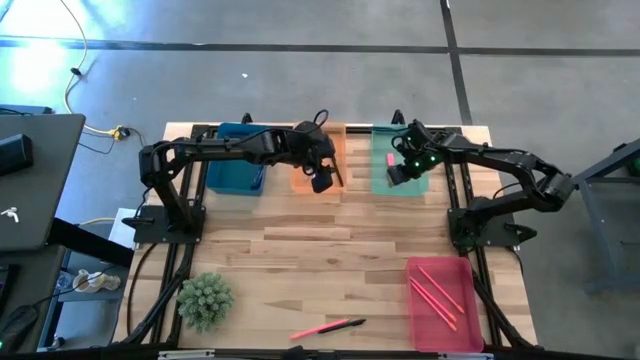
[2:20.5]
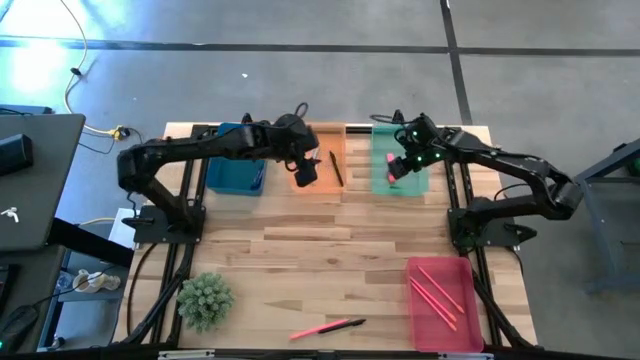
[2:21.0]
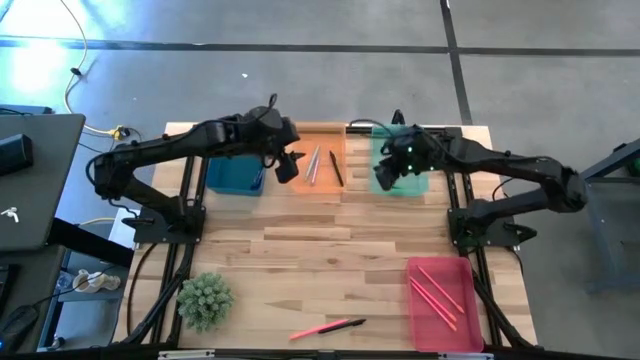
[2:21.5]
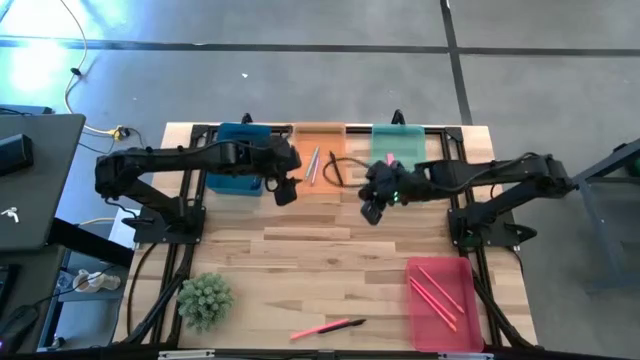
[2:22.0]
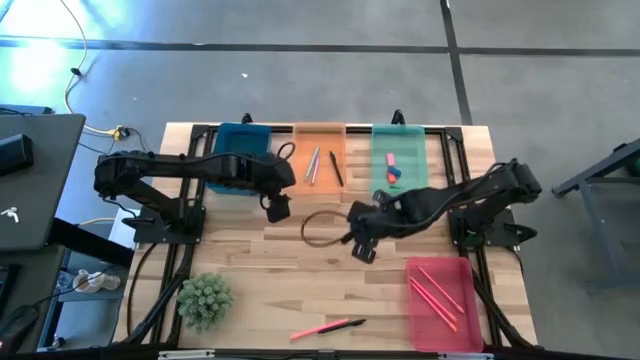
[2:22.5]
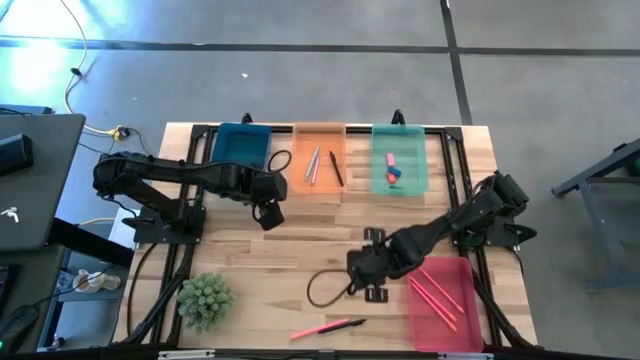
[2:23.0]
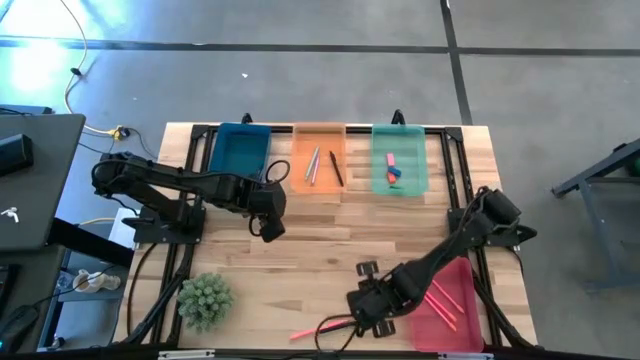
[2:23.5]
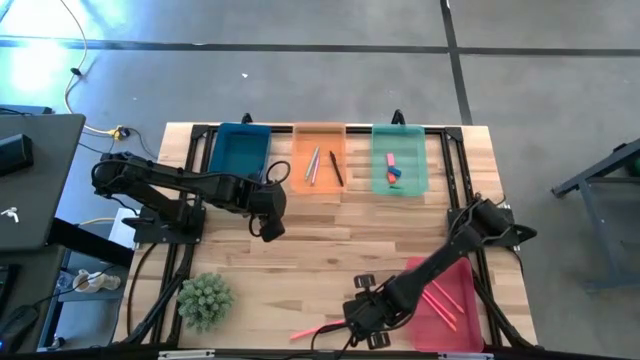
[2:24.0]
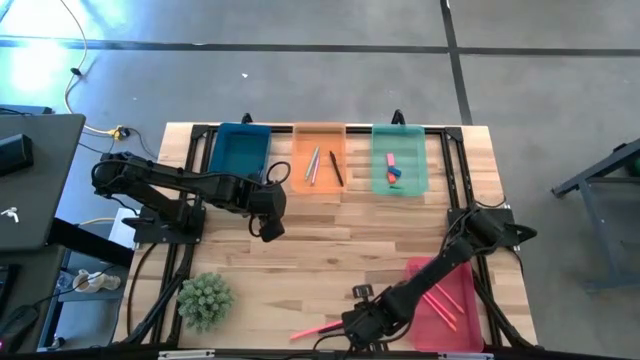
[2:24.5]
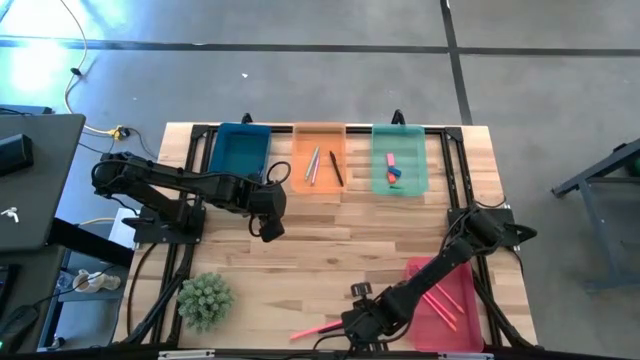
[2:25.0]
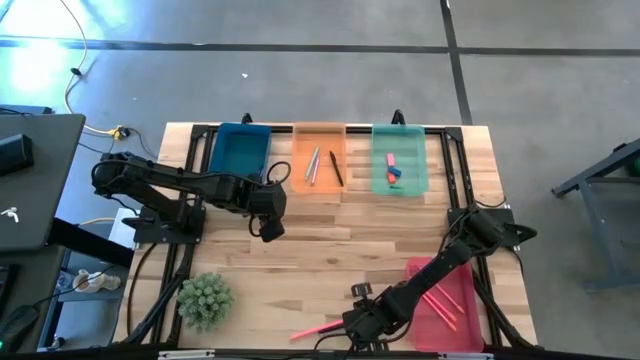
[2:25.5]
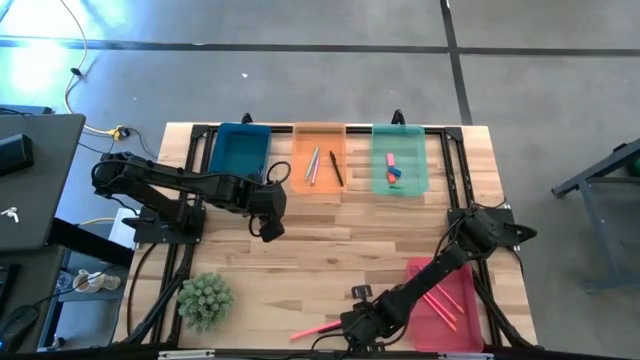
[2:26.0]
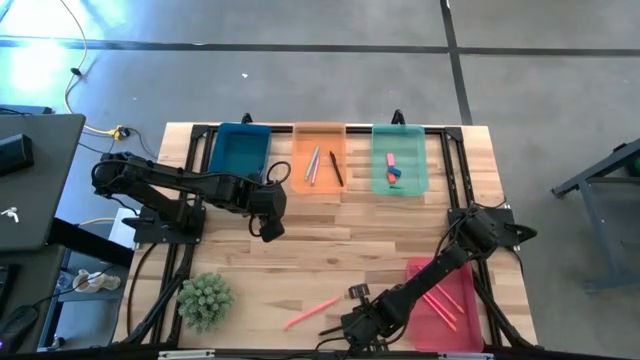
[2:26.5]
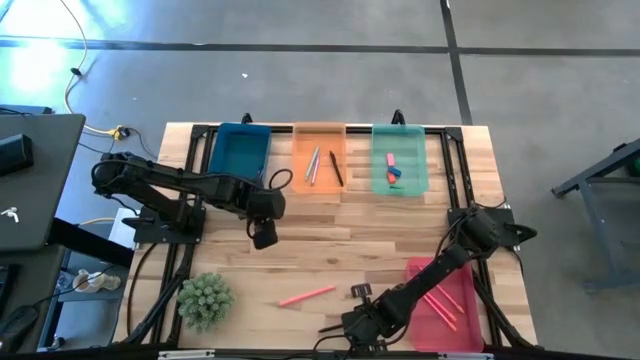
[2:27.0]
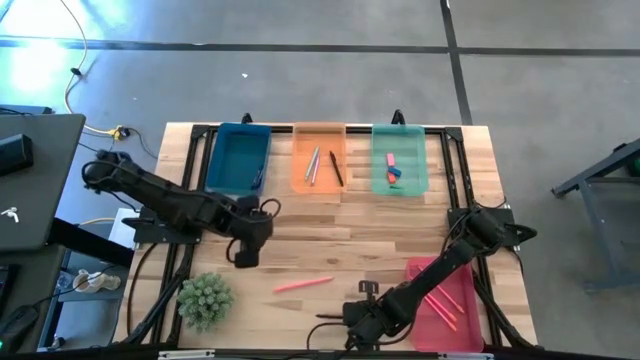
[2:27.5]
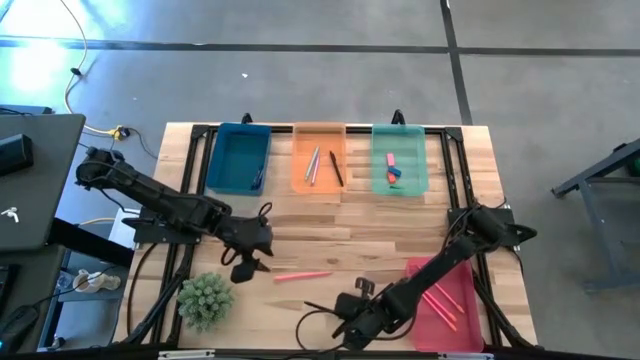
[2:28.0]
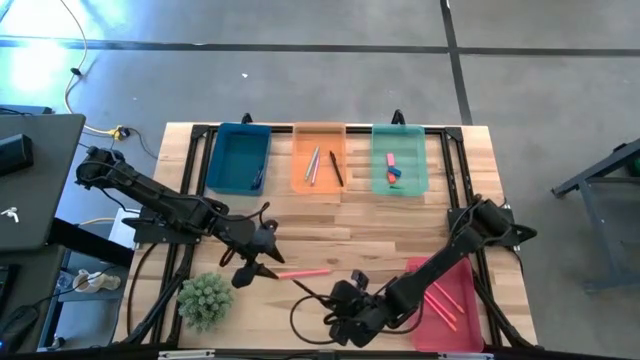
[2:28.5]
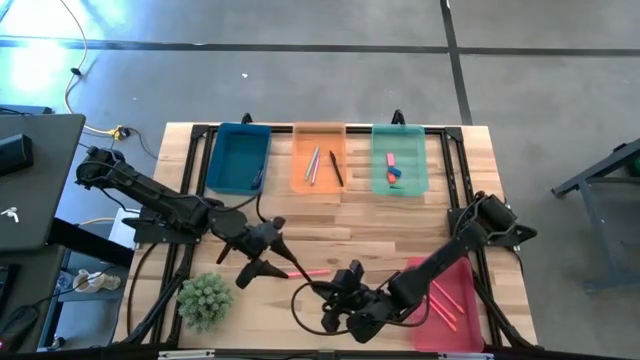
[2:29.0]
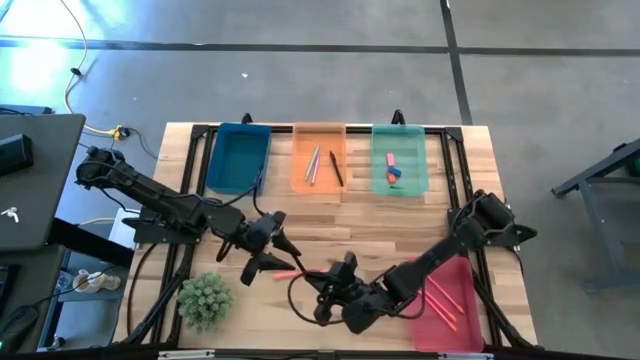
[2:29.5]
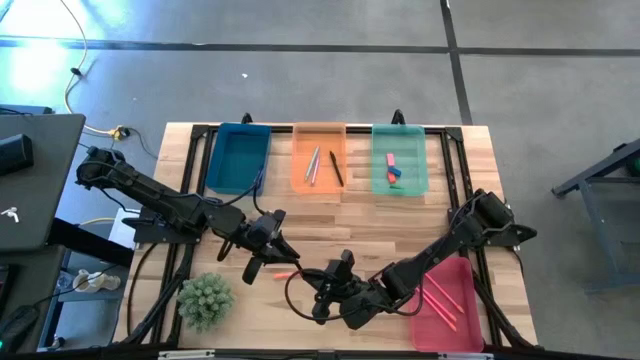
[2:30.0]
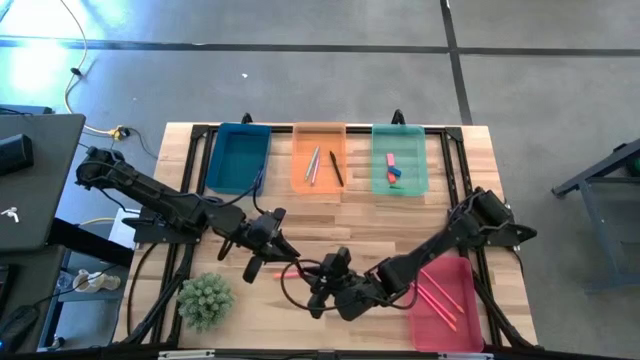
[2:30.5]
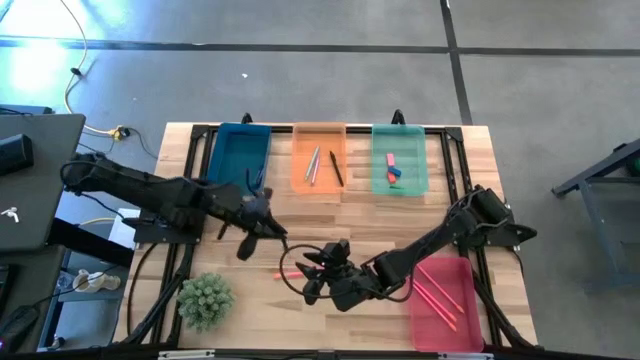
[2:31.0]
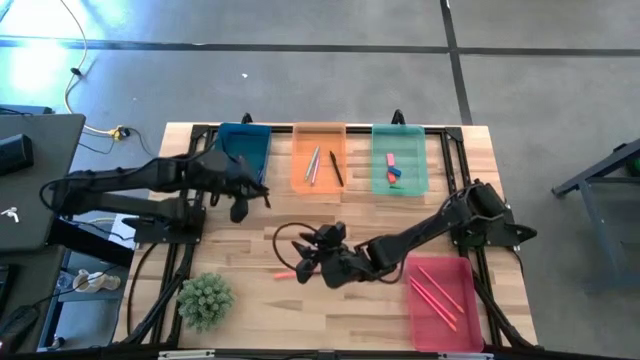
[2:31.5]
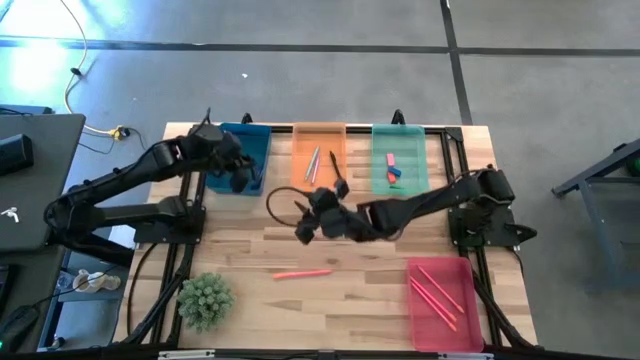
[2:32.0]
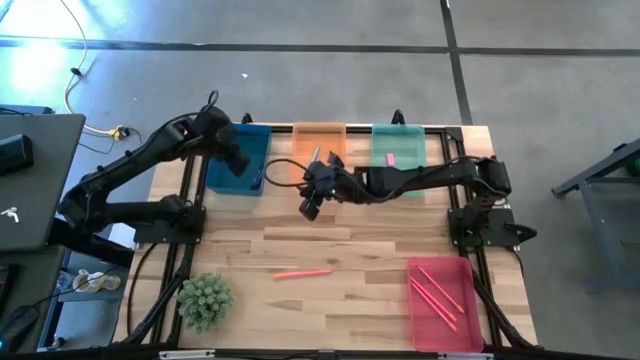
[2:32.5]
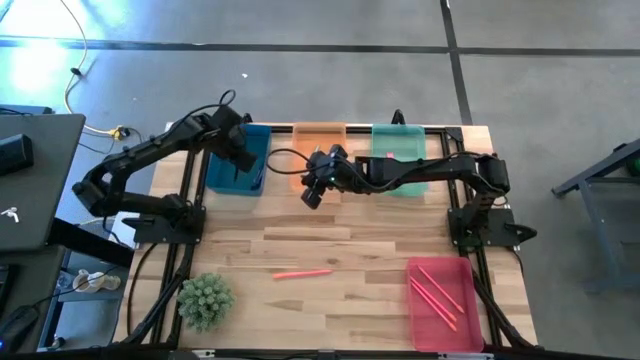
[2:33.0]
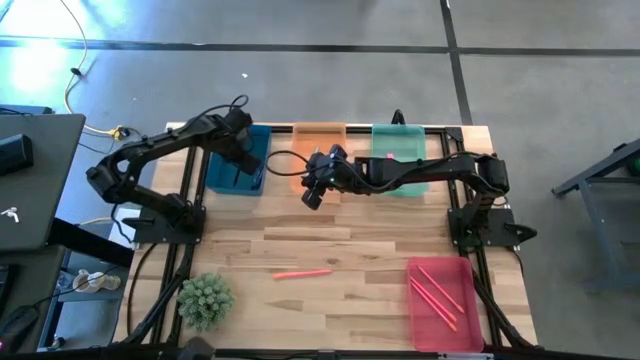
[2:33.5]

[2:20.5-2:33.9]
Task: Sort crayons/erasers/pens/pencils in bins
Put the black ballpen into the orange bin

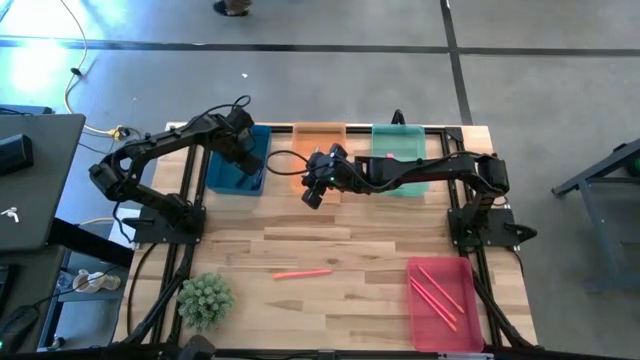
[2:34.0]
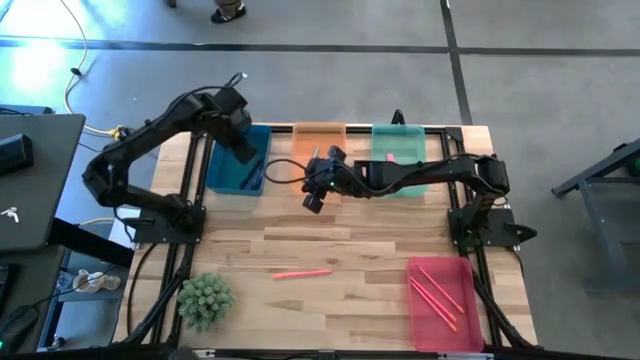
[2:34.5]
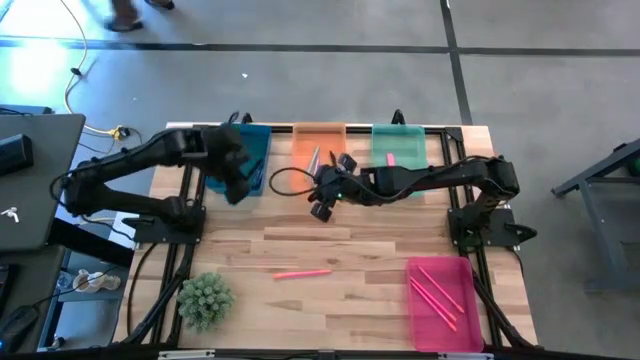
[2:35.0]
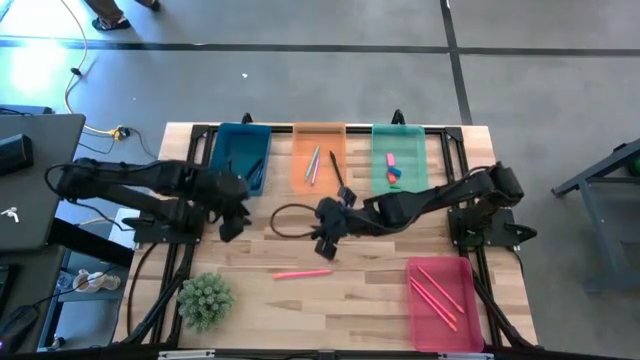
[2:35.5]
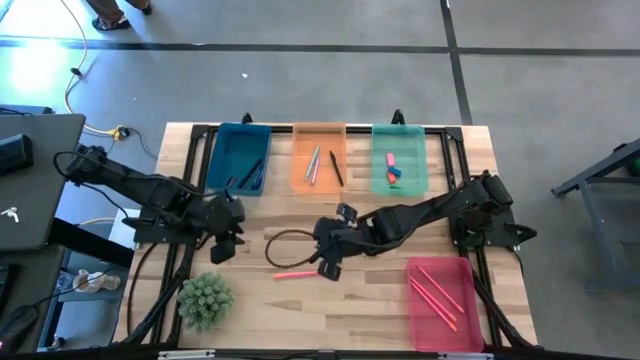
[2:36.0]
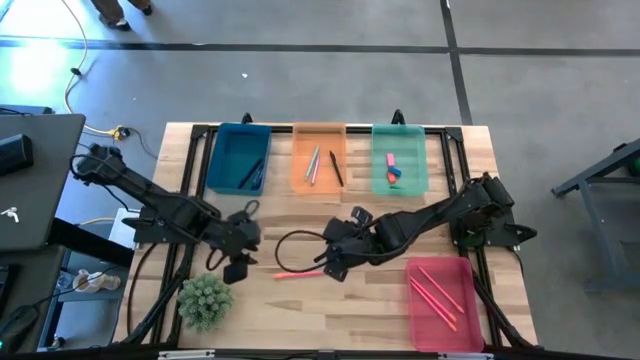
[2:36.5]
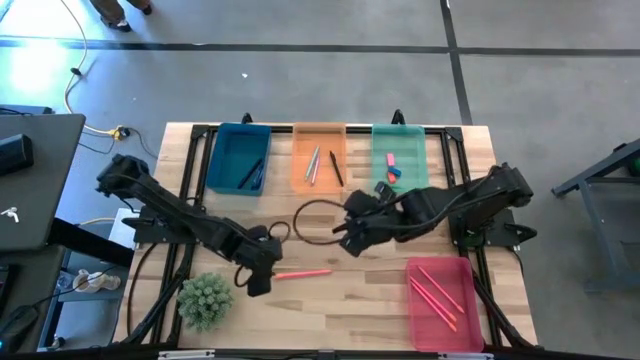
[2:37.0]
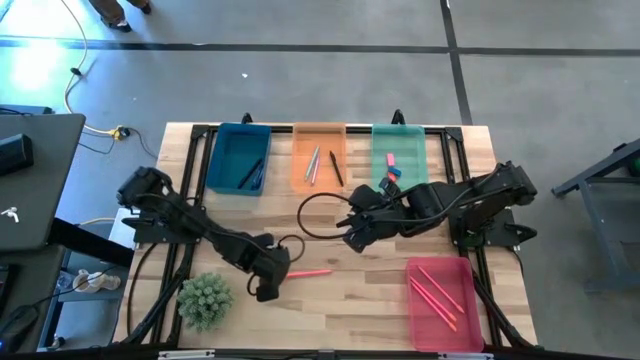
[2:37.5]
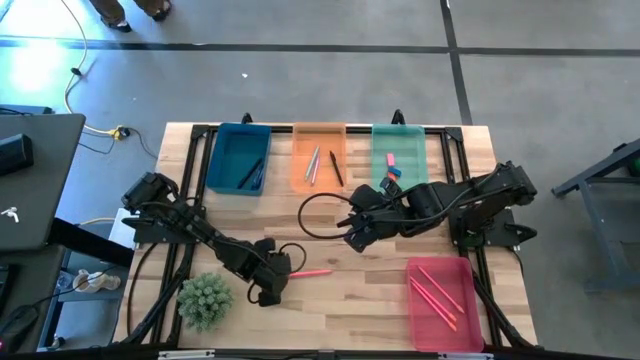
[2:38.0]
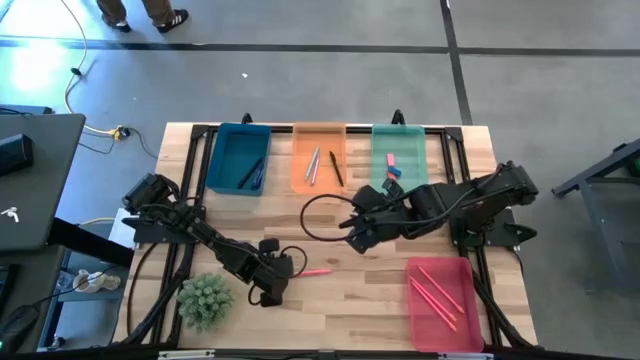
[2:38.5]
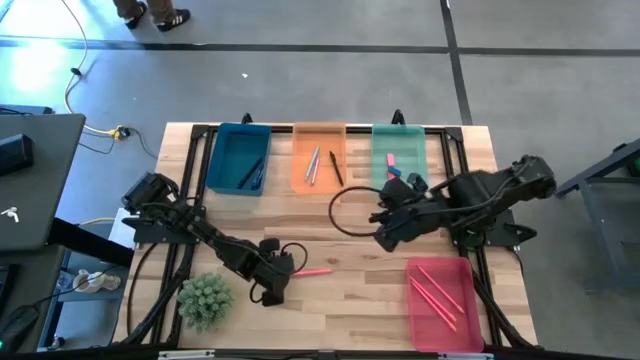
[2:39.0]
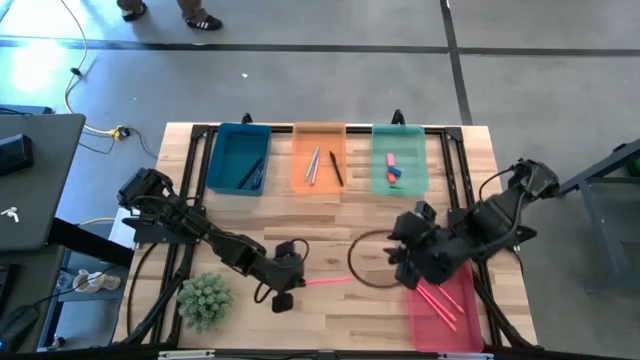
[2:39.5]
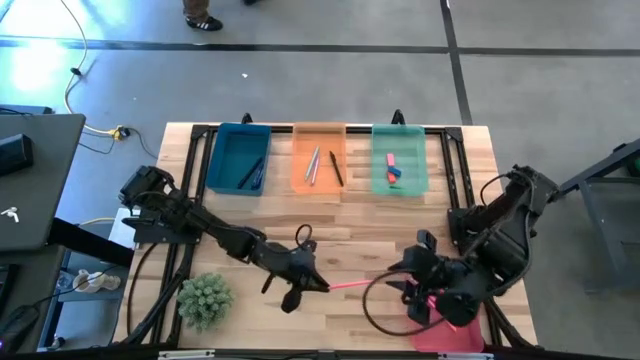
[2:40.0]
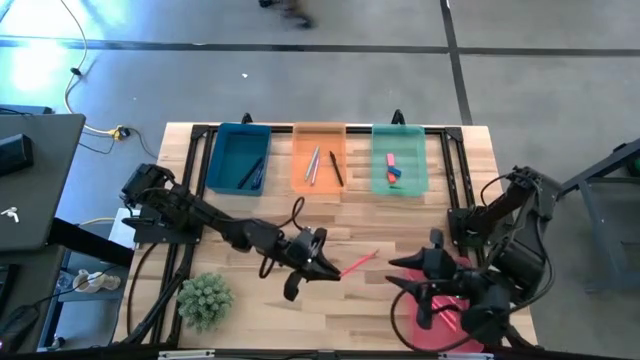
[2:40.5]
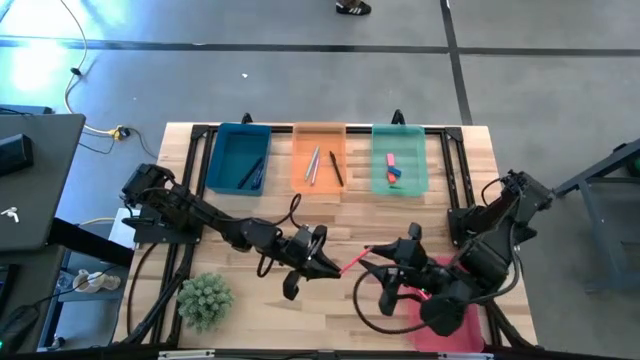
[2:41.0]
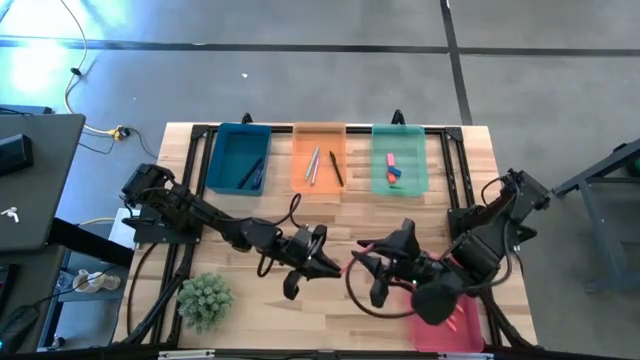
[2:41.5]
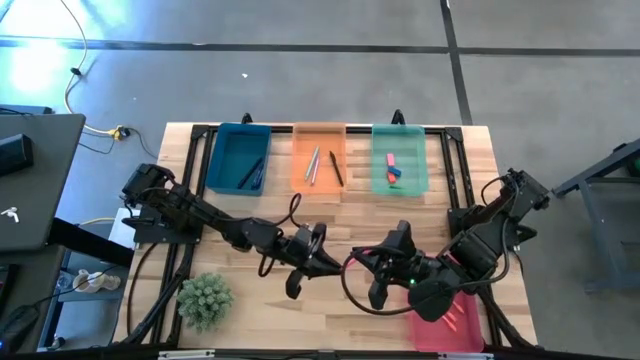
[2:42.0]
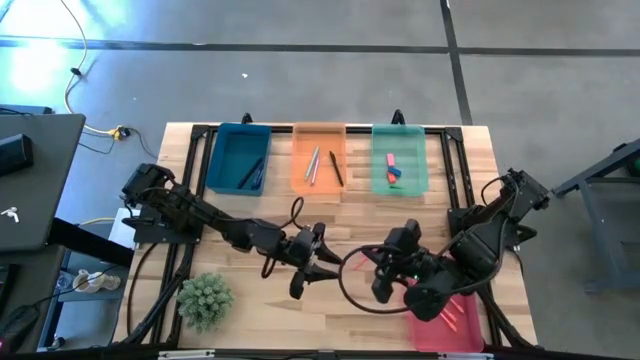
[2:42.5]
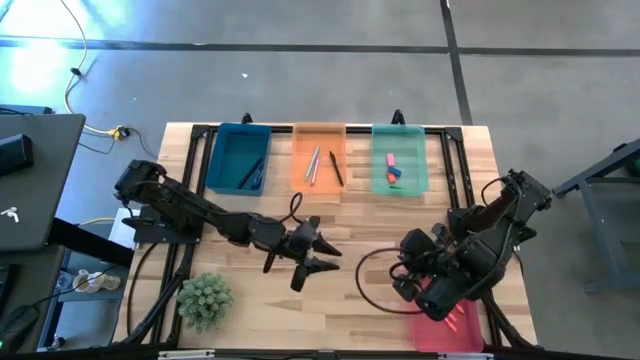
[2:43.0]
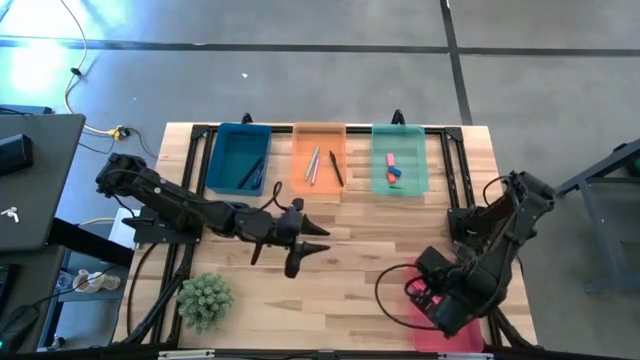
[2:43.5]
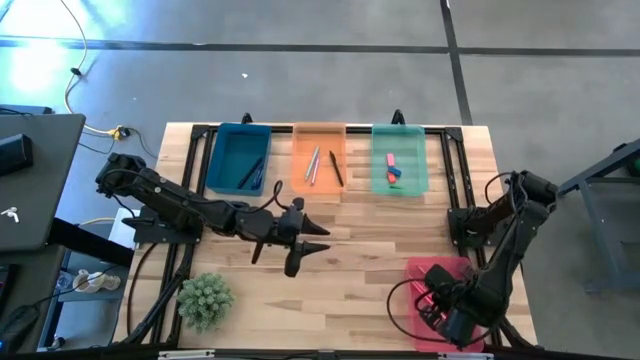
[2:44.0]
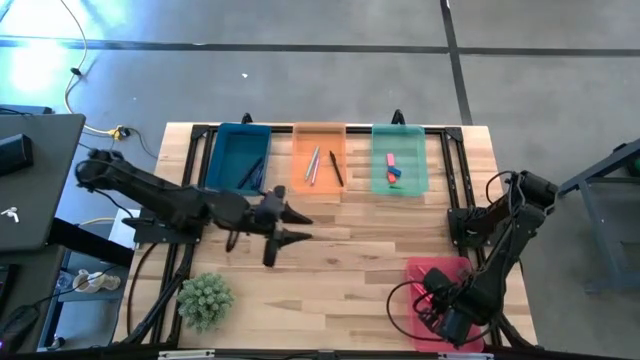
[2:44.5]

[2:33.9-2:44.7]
Put the pink pencil into the pink bin
